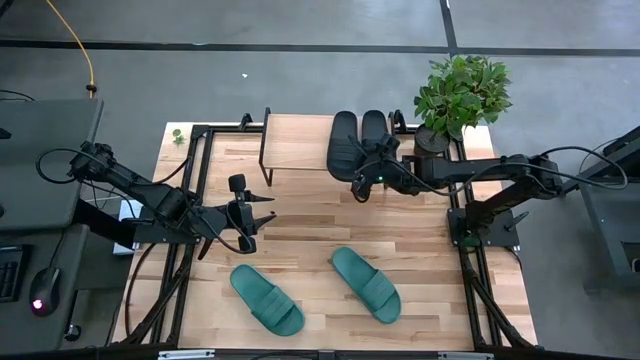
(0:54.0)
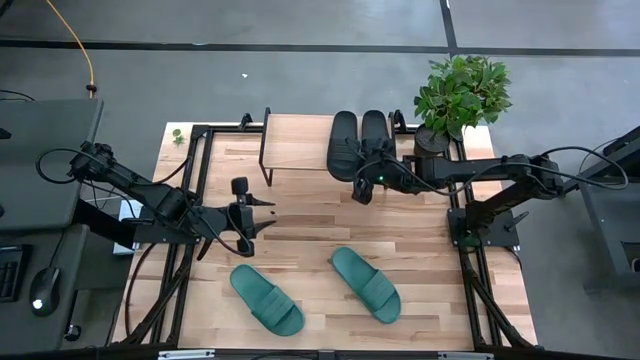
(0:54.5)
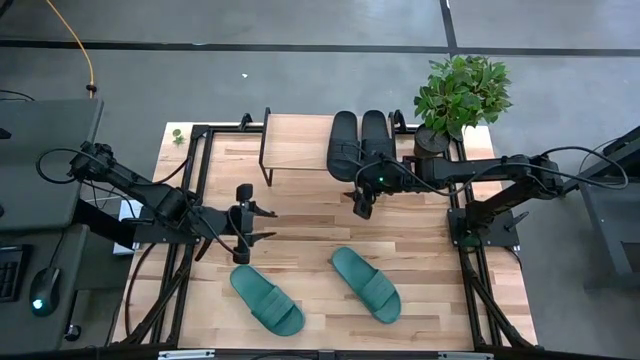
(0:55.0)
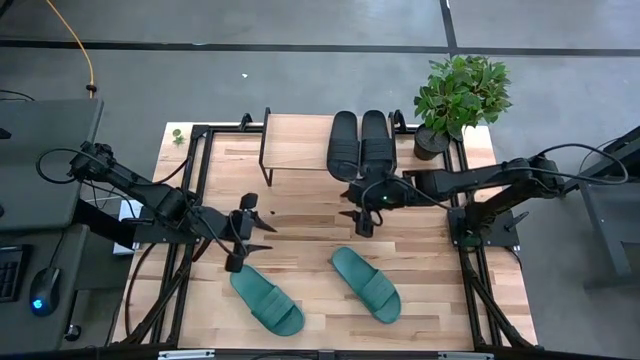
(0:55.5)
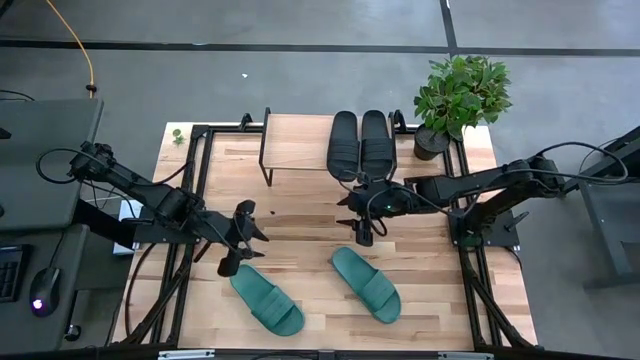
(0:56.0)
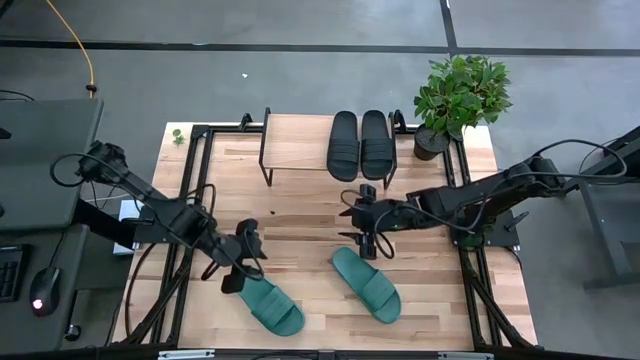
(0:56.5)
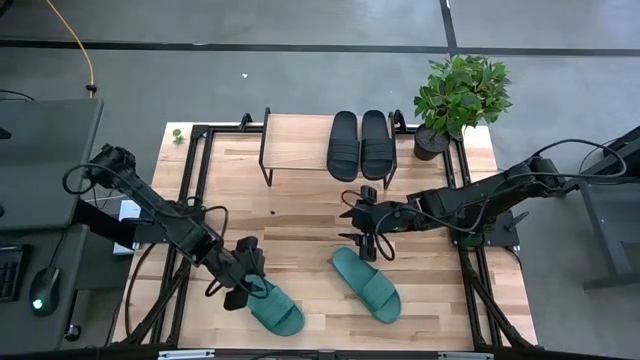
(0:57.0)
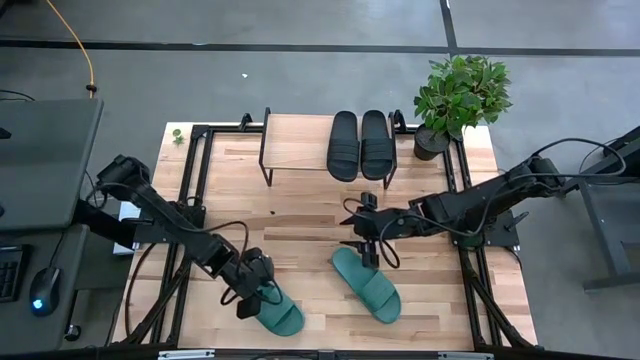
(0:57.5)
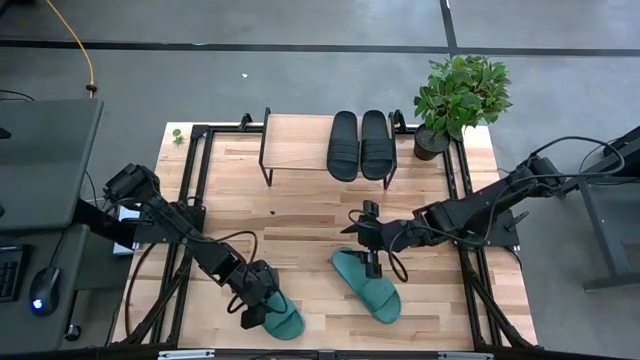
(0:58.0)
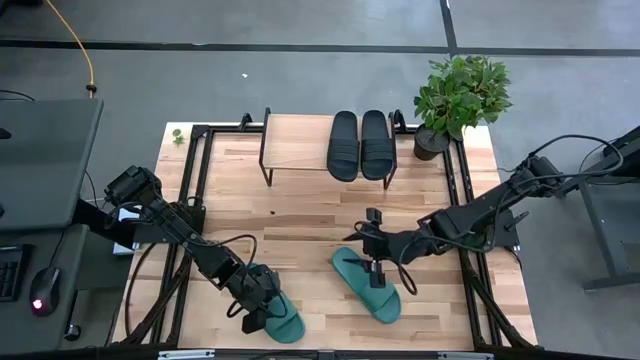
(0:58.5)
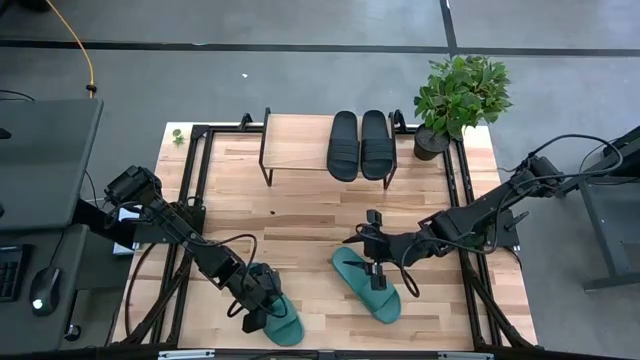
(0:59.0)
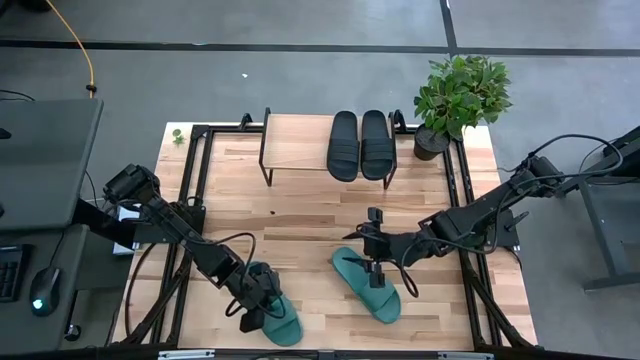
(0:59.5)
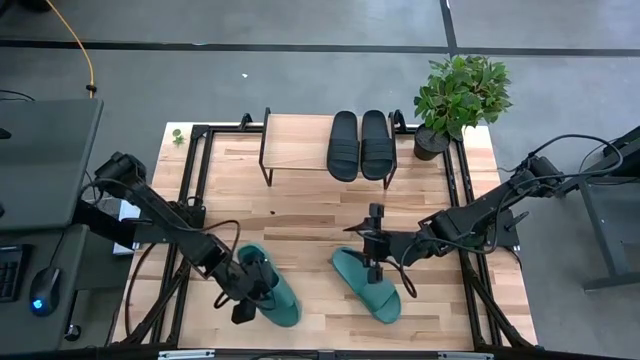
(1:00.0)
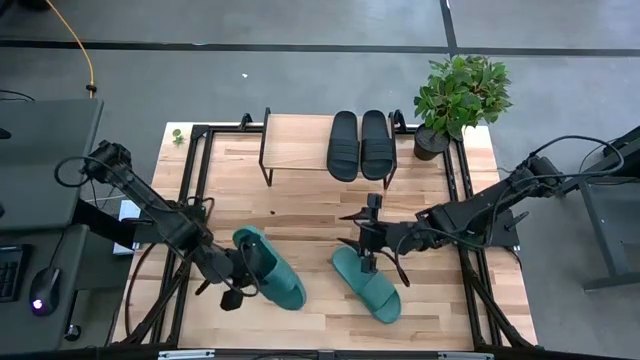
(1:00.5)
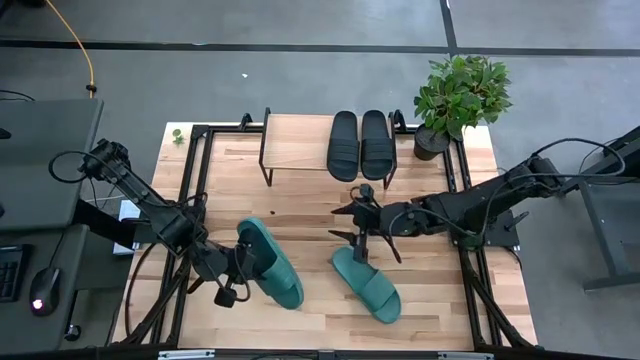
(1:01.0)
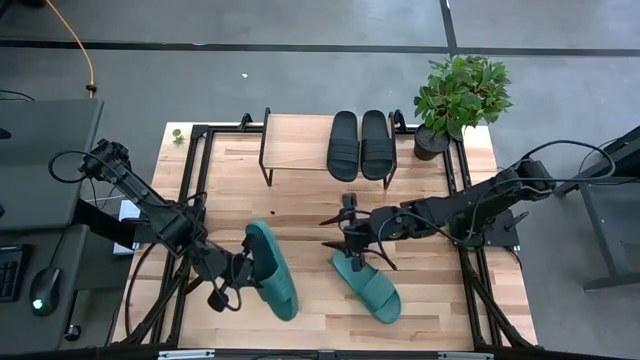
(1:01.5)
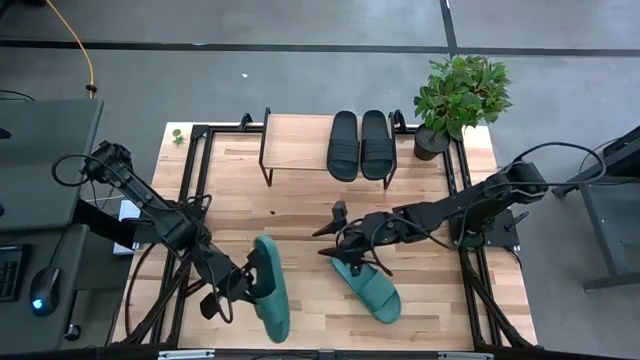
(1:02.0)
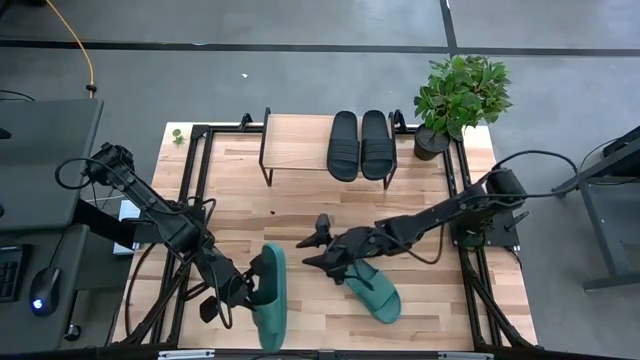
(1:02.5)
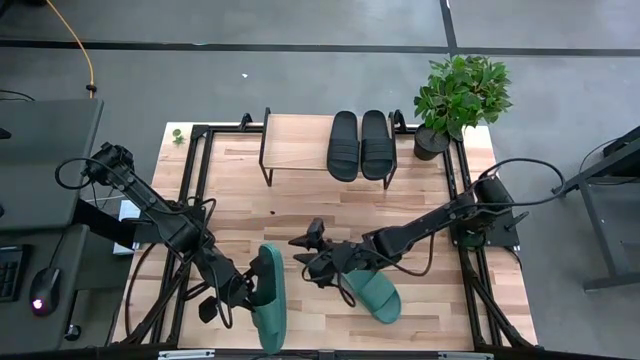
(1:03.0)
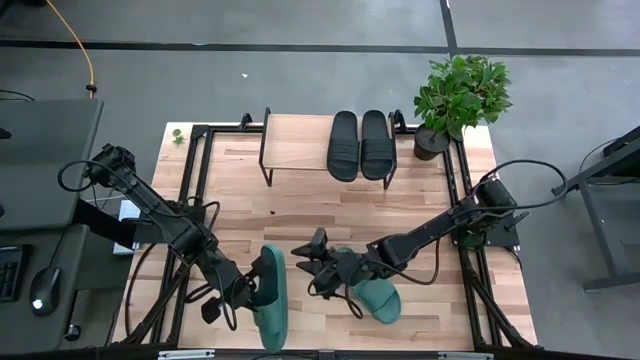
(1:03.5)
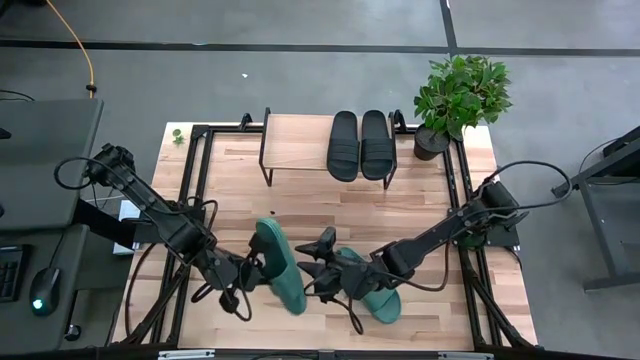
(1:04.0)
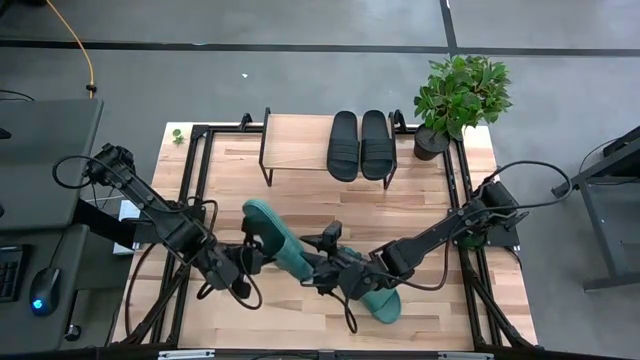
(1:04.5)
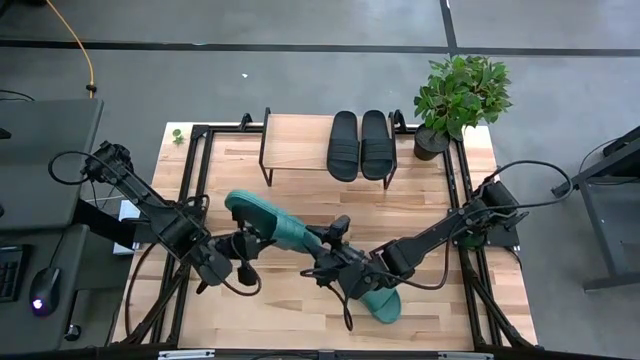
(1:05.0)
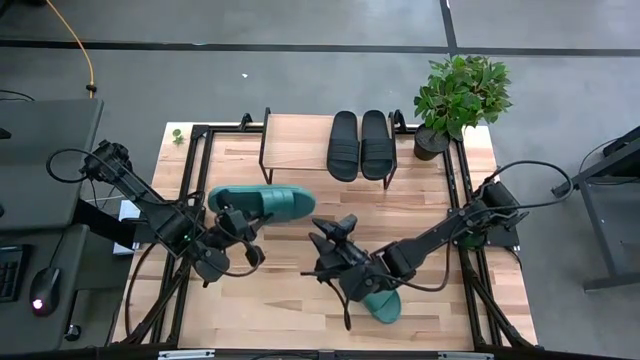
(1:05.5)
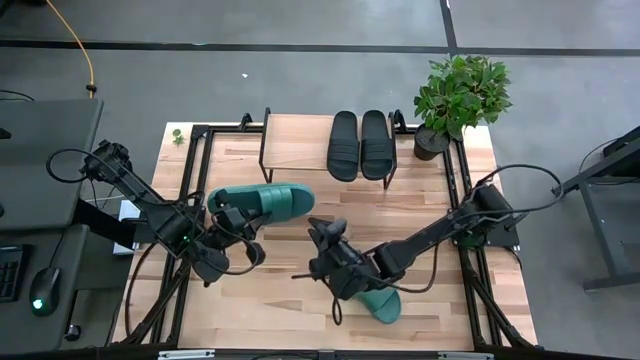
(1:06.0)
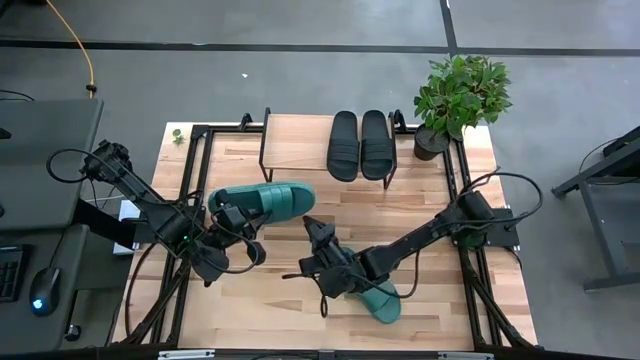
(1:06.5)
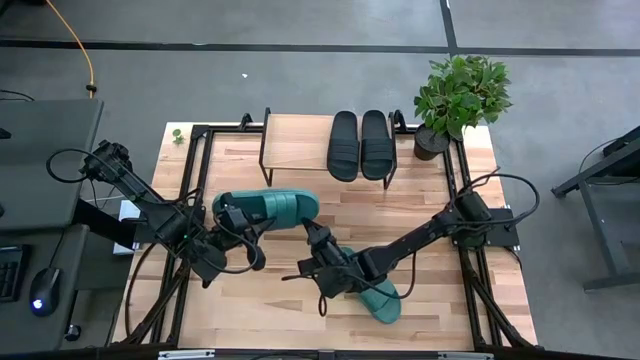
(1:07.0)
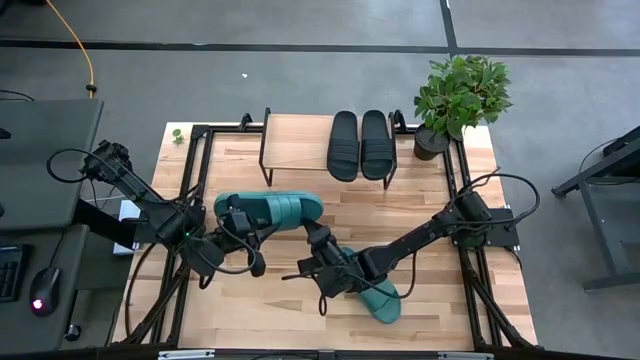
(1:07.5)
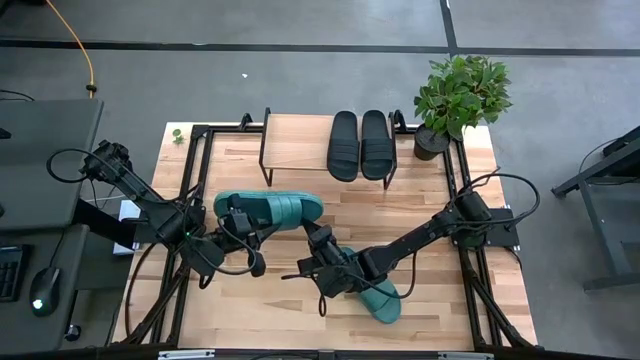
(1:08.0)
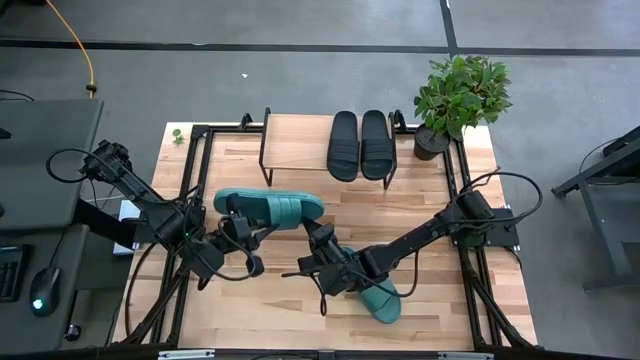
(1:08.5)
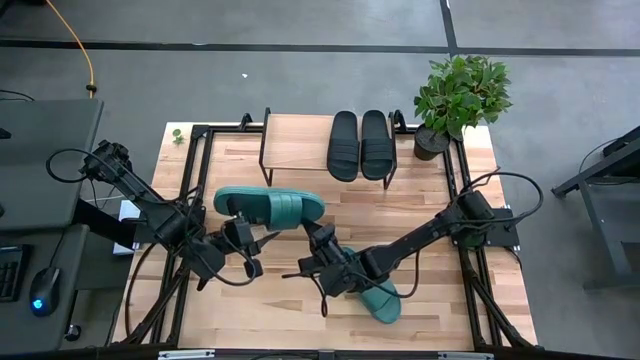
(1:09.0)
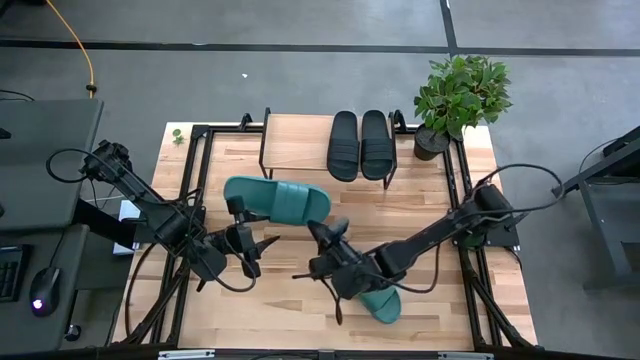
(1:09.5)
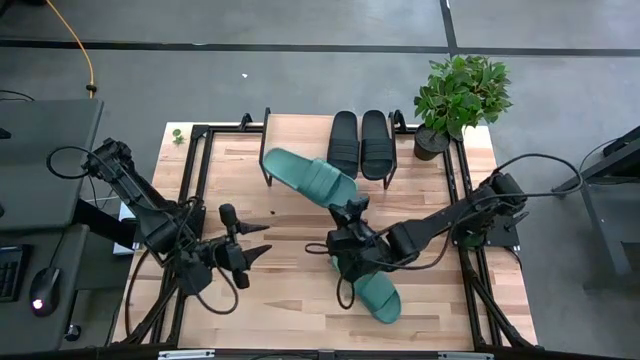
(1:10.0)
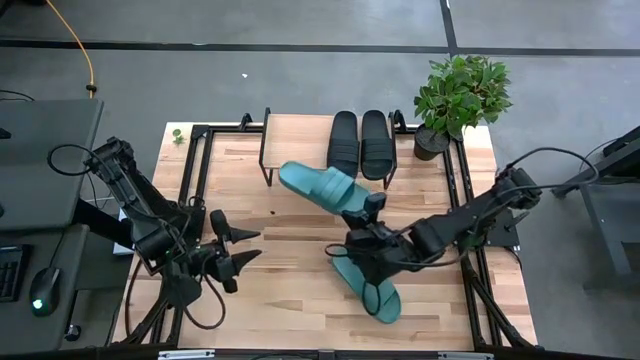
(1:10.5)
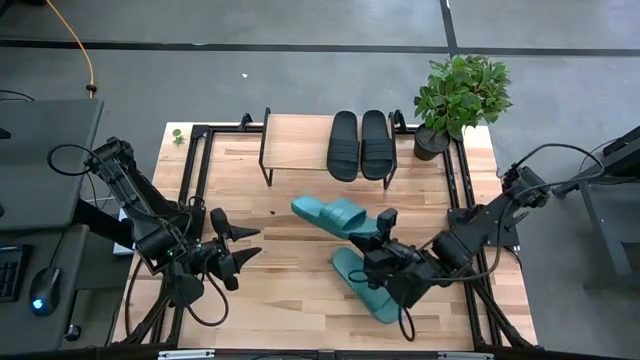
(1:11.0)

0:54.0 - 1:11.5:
Task: Pick and place slides into the shelf
Put the left green slipper on the shelf

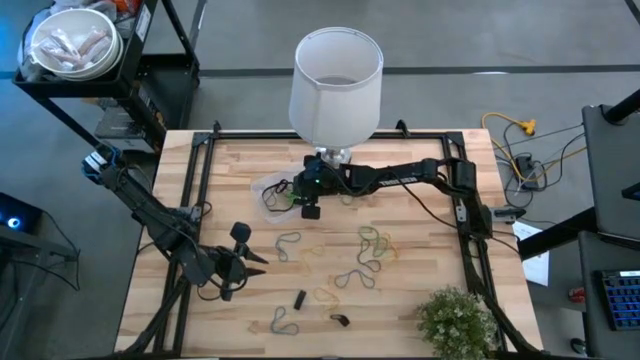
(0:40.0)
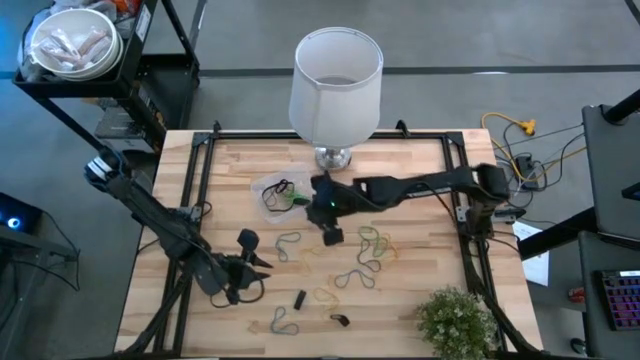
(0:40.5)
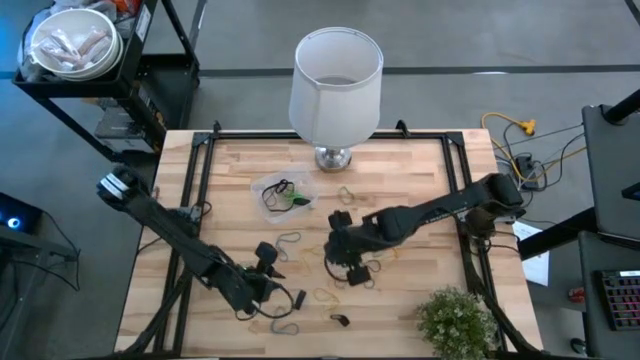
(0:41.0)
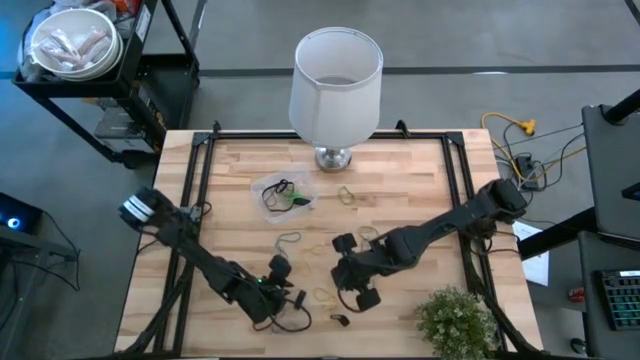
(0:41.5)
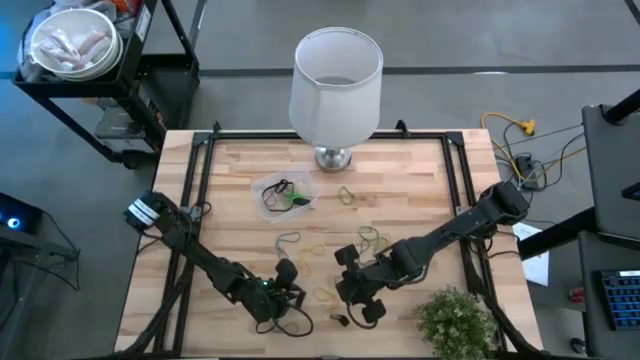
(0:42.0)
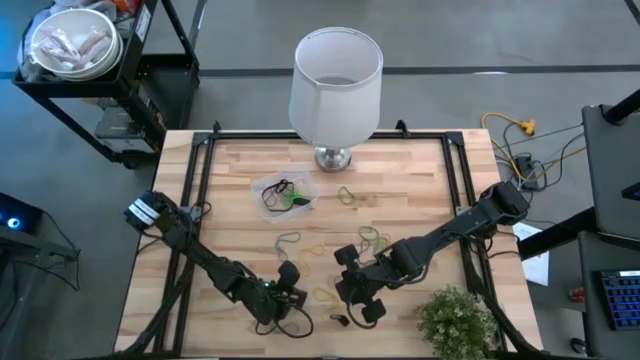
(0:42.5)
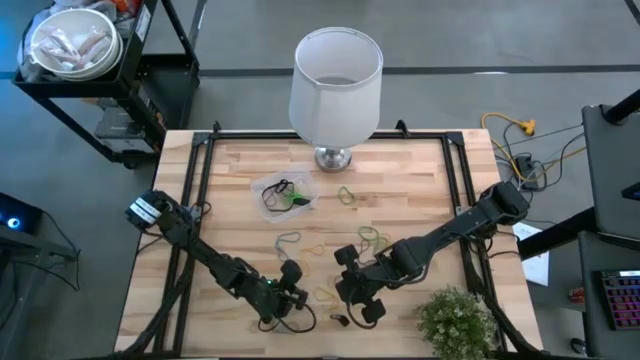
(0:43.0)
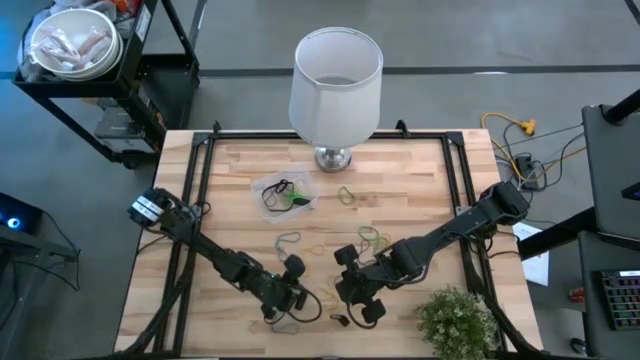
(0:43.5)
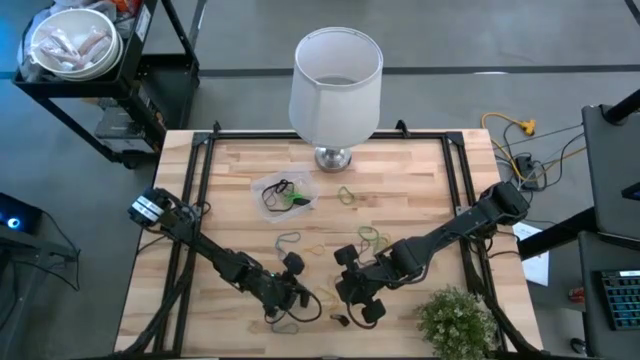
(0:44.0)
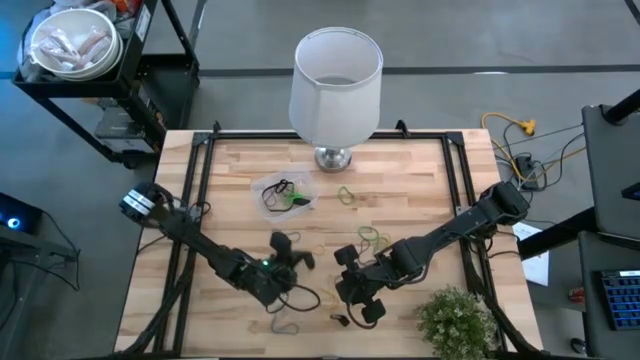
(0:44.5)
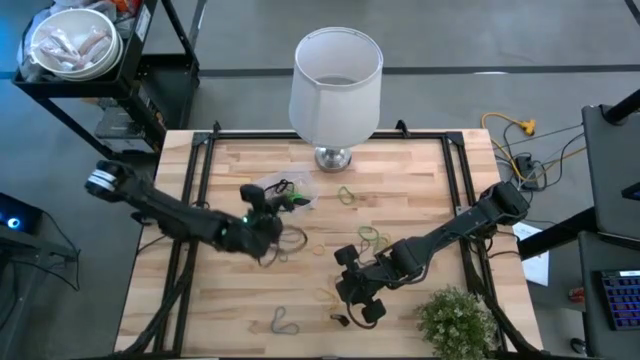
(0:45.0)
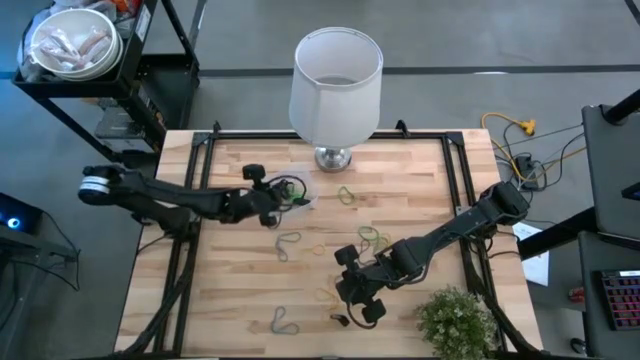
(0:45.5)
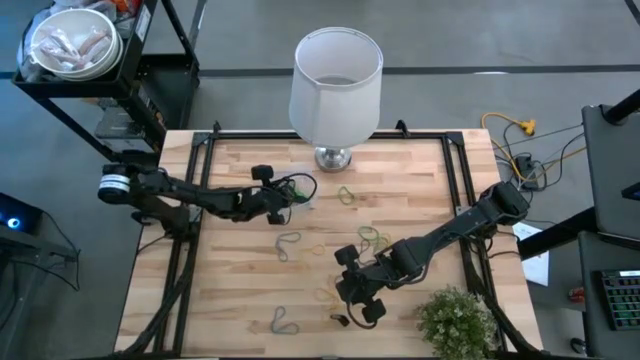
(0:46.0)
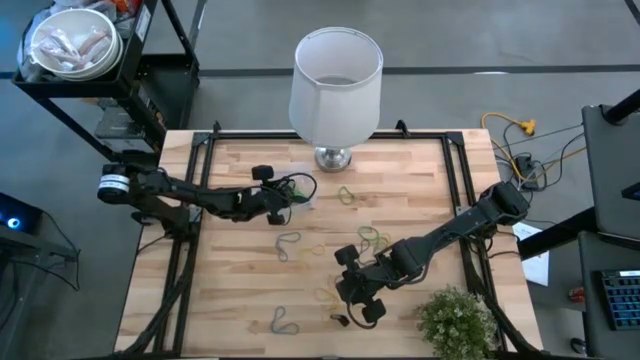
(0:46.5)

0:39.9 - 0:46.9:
Task: Pick and place rubber bands into bin
Put the black rubber band into the transparent bin
